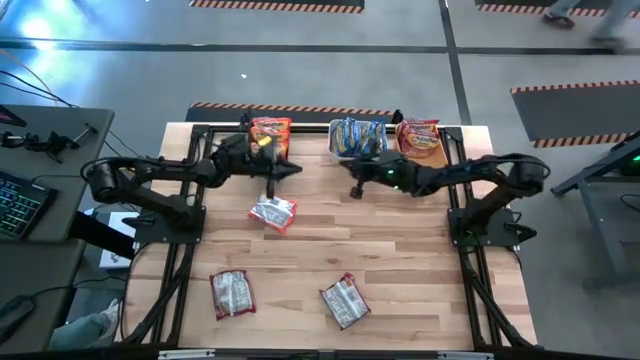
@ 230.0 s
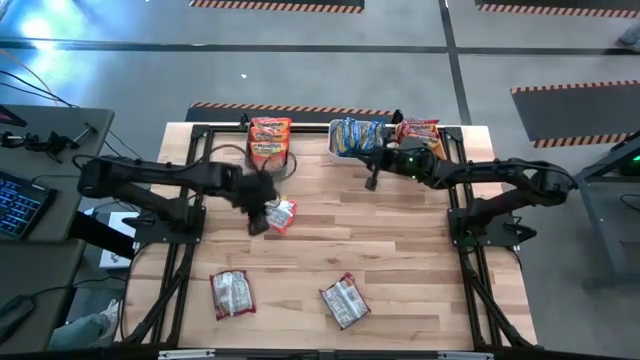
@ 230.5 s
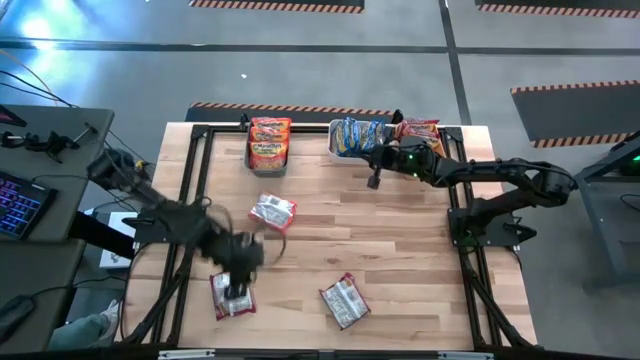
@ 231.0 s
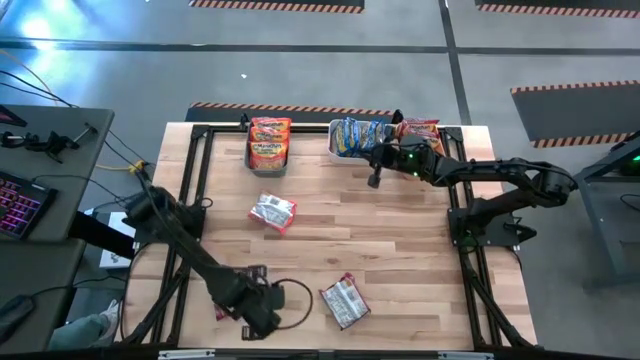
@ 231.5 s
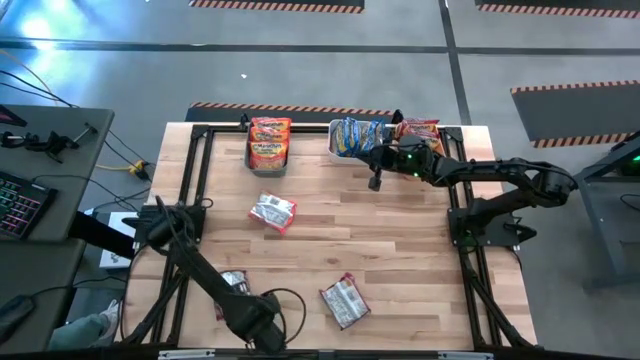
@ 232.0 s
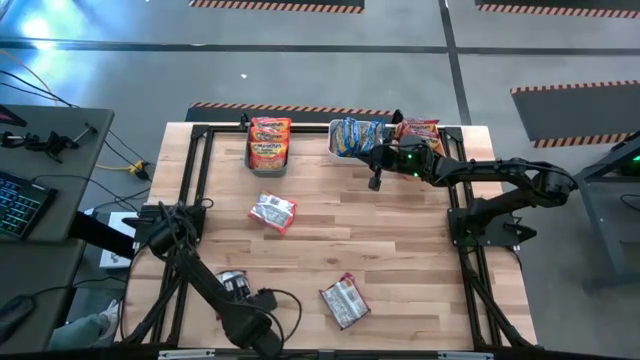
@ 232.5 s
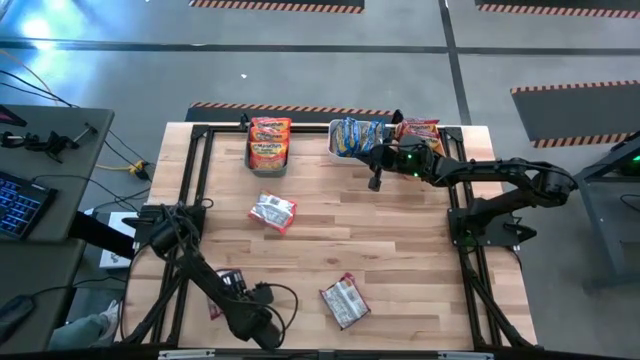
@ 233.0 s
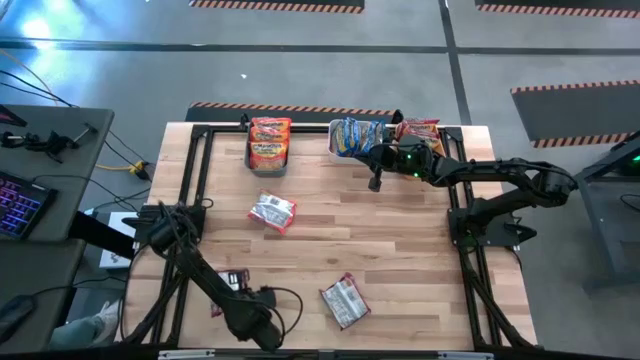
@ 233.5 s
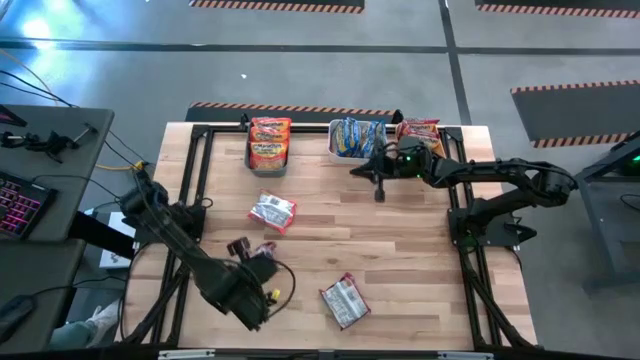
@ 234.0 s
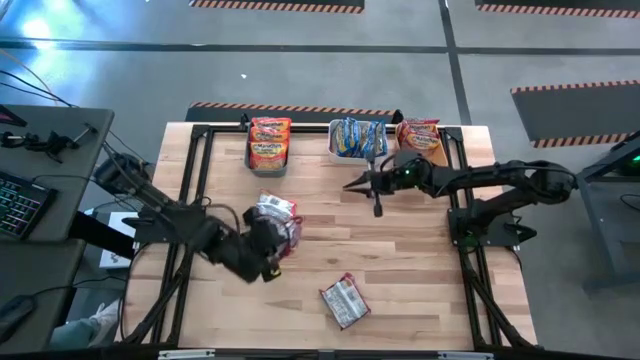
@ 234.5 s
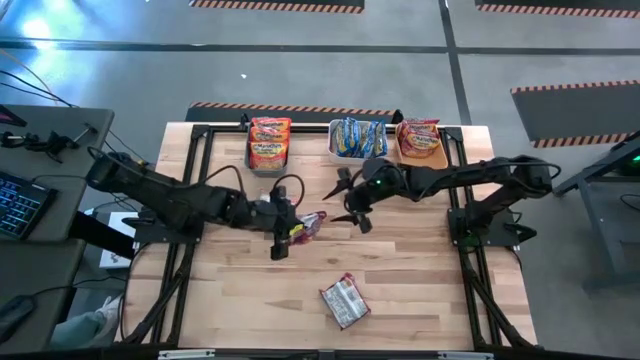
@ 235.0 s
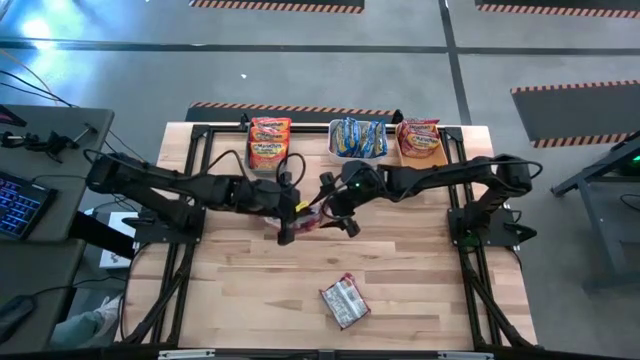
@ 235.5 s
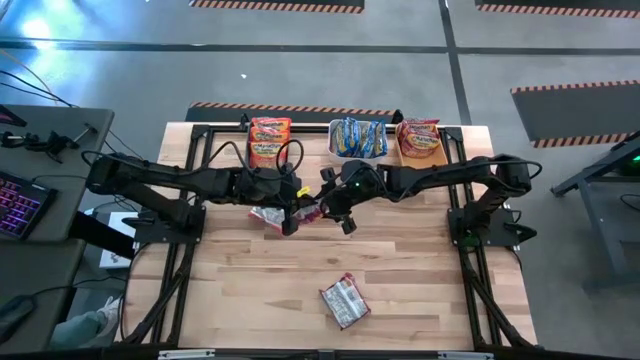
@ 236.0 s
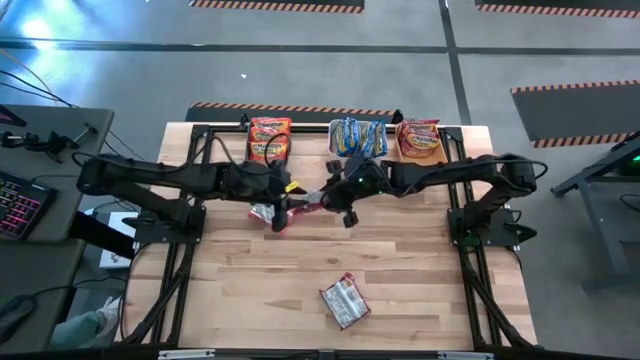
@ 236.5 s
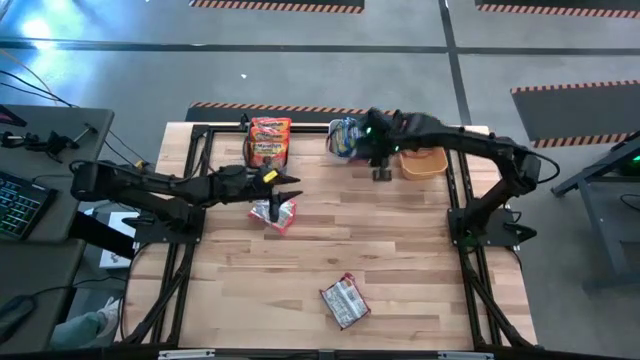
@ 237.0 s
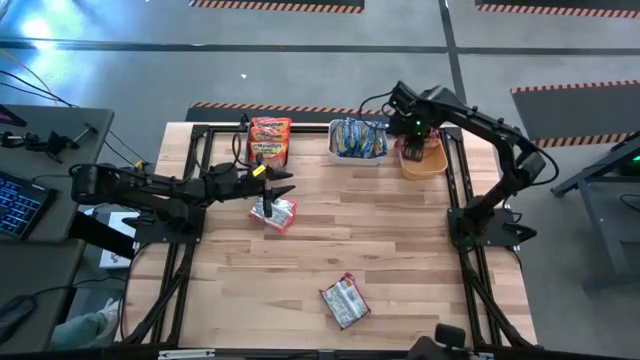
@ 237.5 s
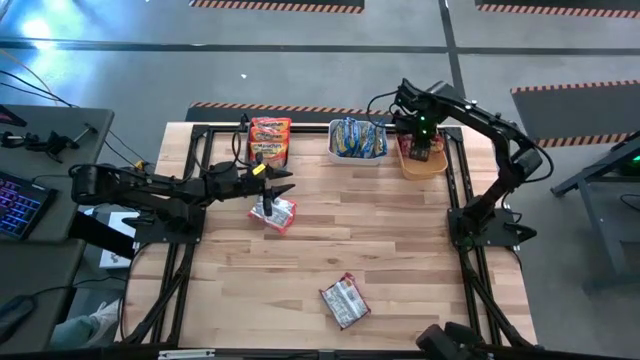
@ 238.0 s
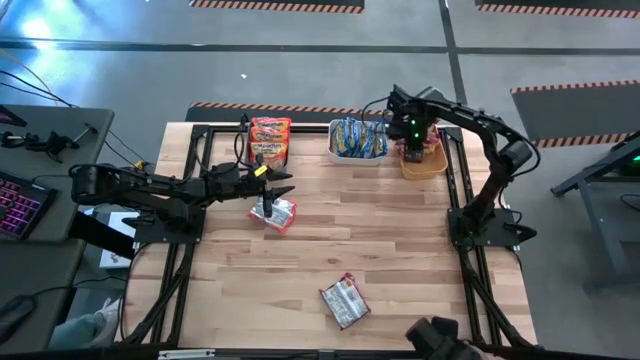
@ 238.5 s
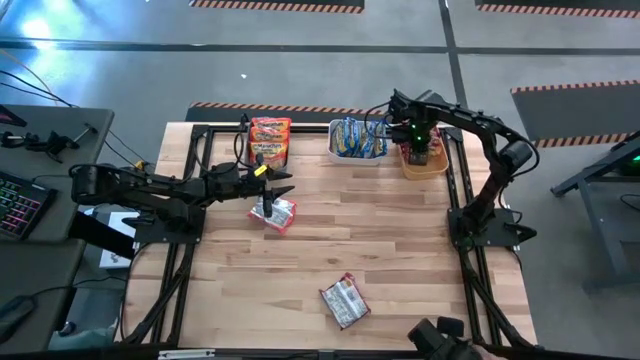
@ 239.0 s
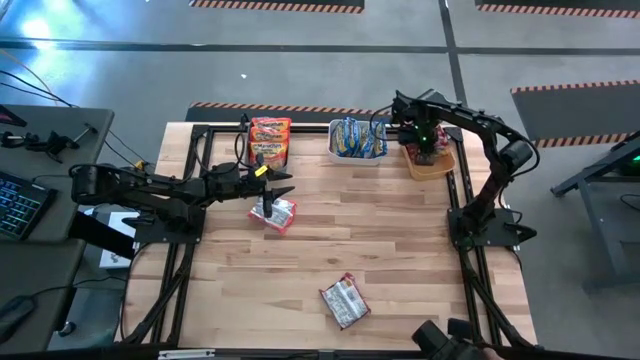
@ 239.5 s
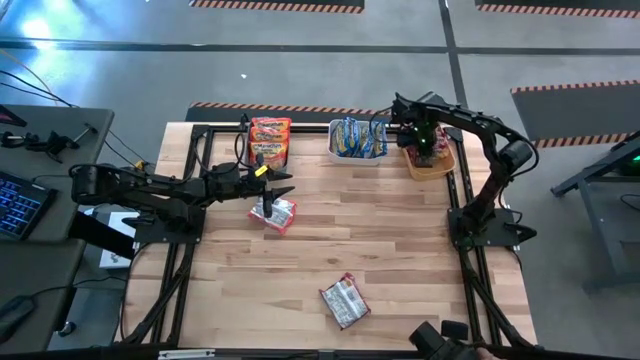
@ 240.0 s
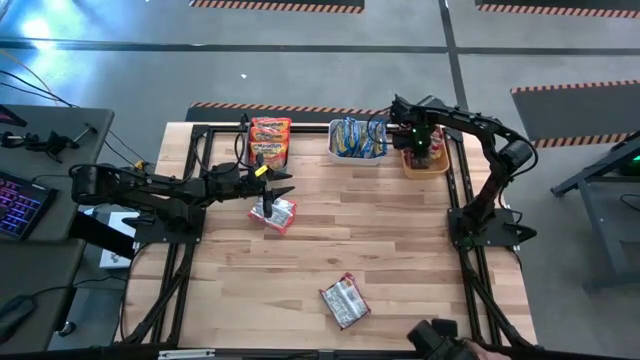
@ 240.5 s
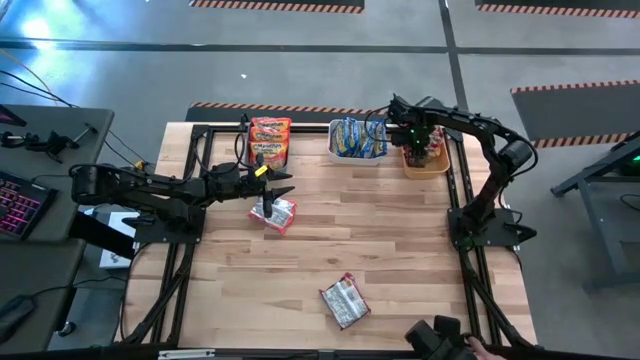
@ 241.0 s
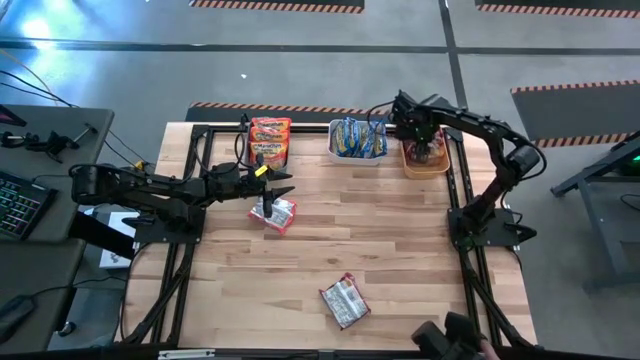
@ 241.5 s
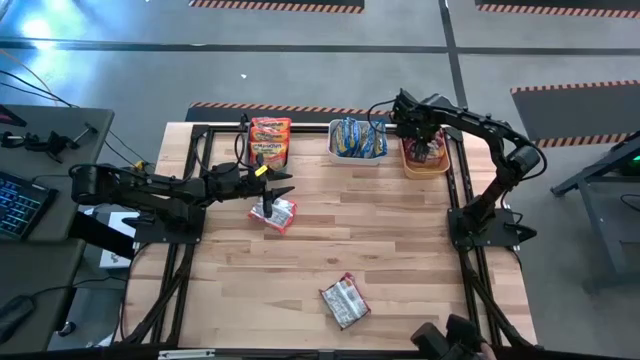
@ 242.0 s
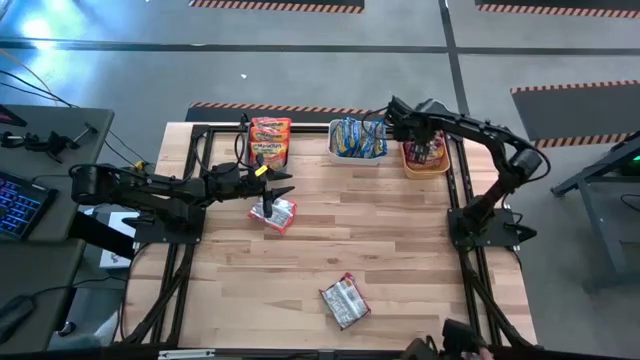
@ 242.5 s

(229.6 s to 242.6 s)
Task: Sort Maruchan noodles
Put the left red noodle pack into the yellow bin

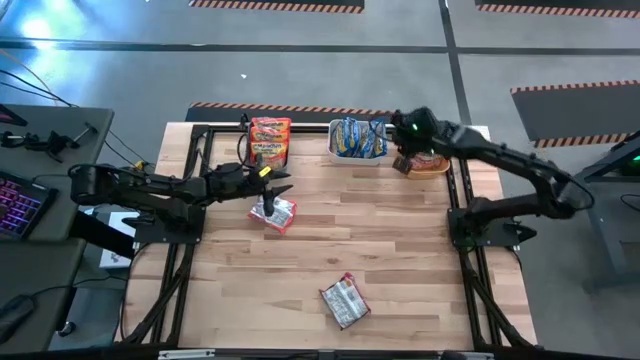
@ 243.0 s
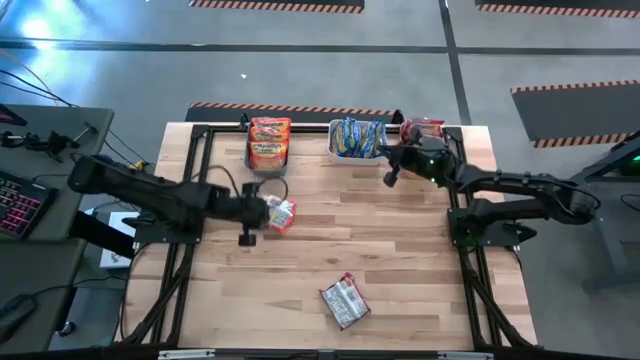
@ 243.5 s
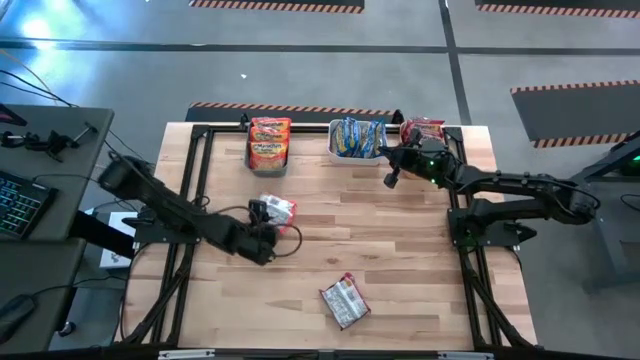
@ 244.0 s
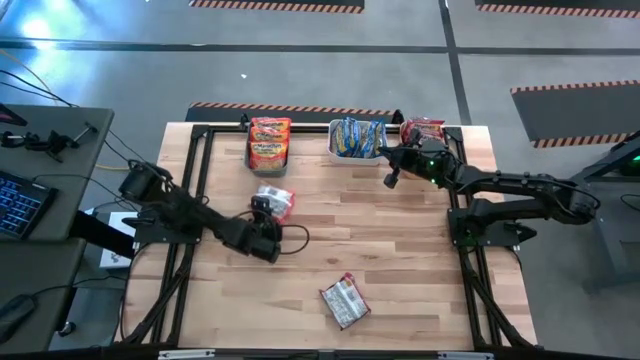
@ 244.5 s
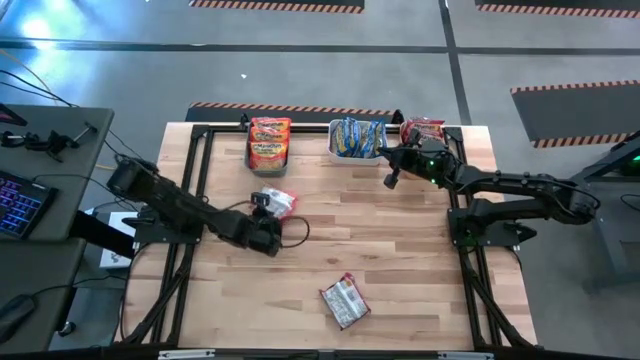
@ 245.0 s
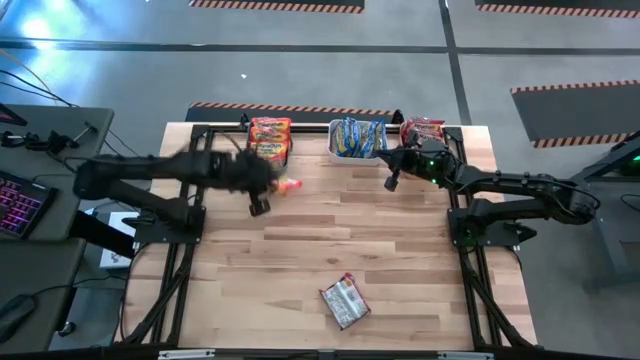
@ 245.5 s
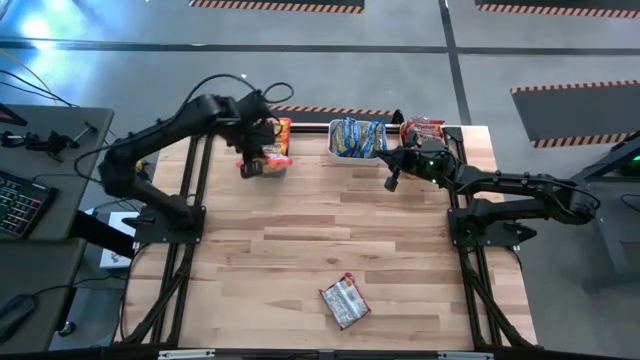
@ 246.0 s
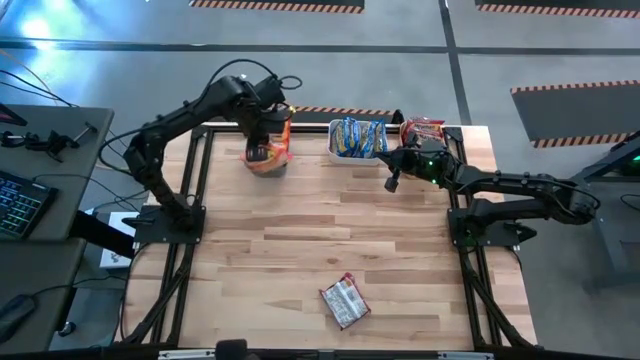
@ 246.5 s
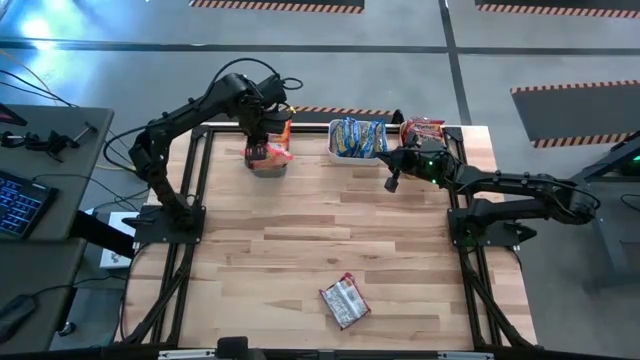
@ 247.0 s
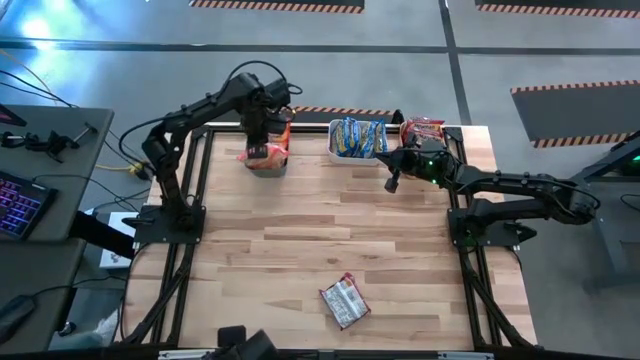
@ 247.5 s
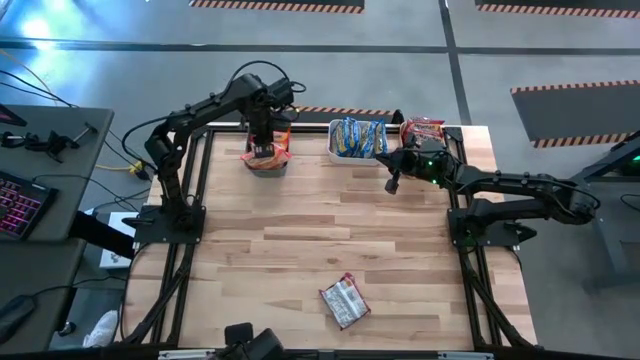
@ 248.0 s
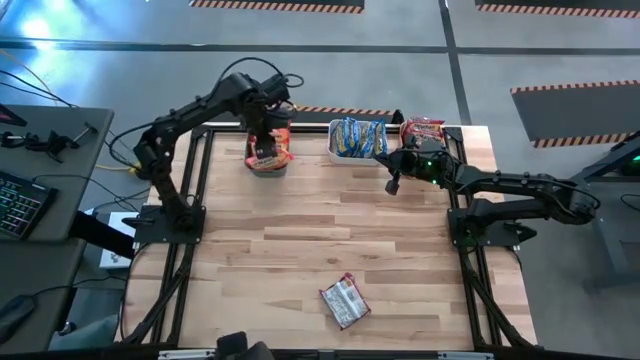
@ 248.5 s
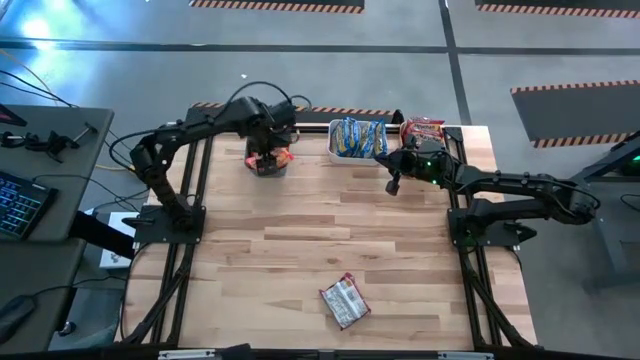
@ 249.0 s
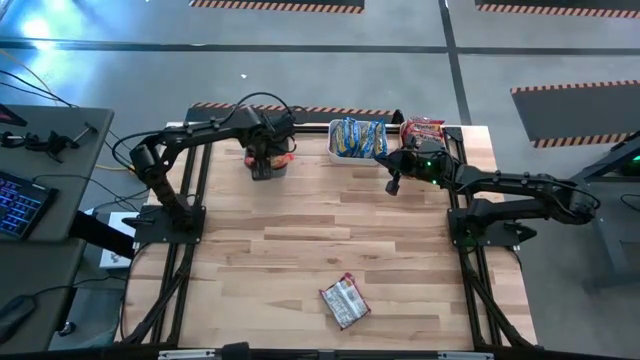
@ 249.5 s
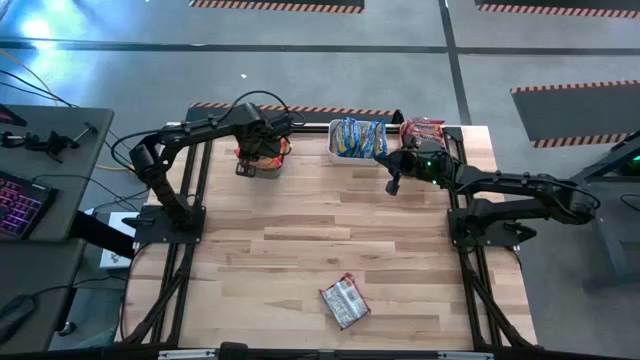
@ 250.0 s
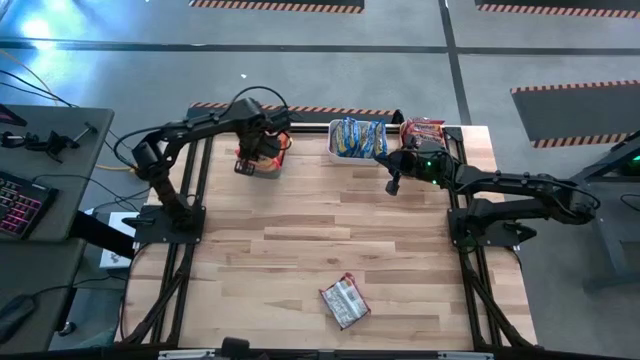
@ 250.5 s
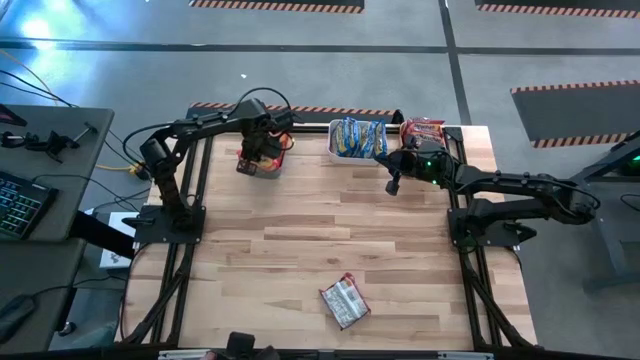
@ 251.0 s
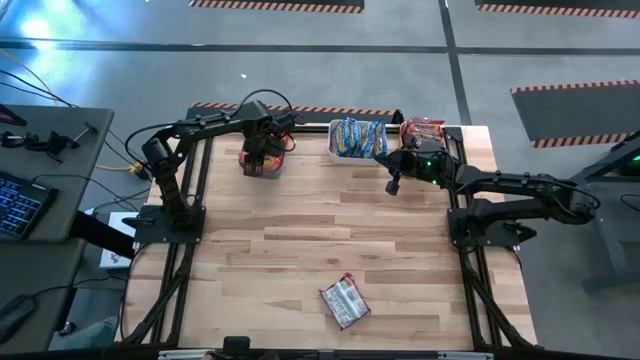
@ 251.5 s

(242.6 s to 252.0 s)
Put the orange noodle pack into the blue bin

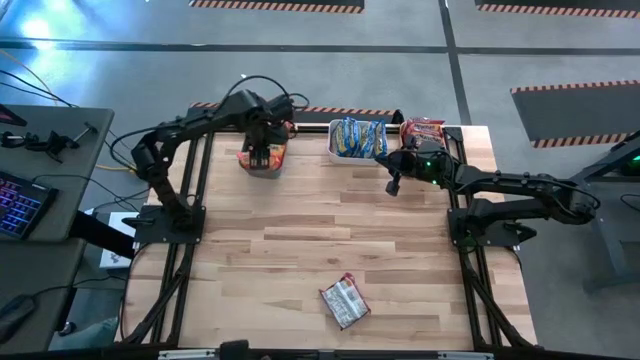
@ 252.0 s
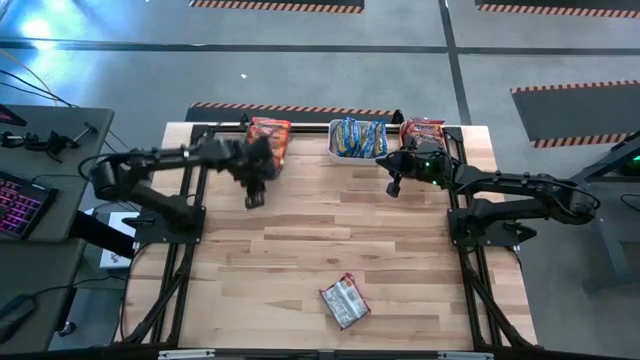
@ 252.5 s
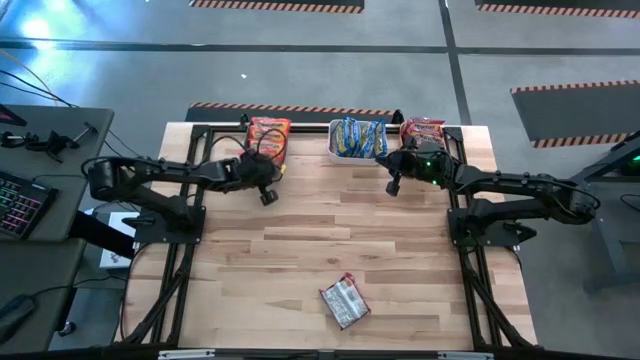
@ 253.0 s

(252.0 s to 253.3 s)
Adjust the blue bin
